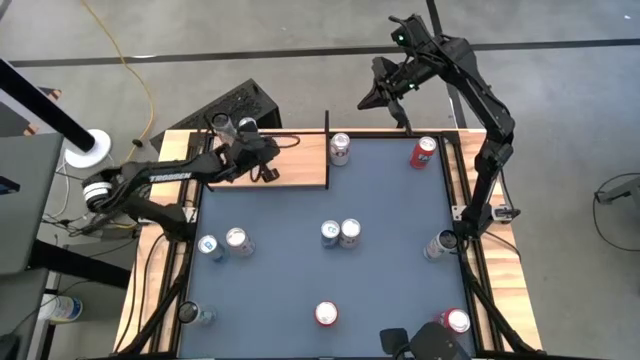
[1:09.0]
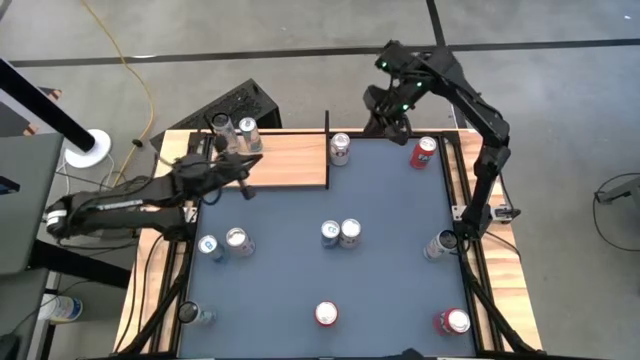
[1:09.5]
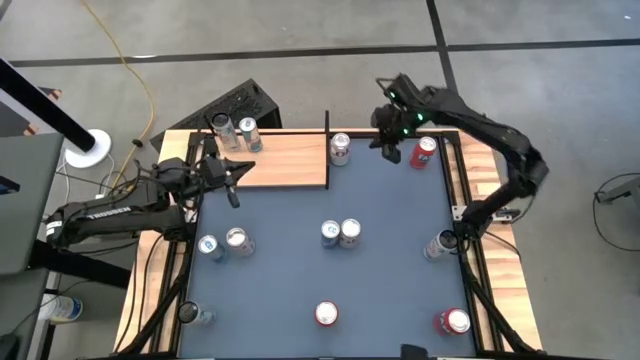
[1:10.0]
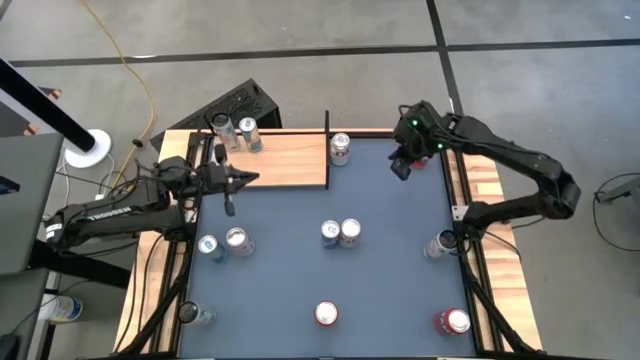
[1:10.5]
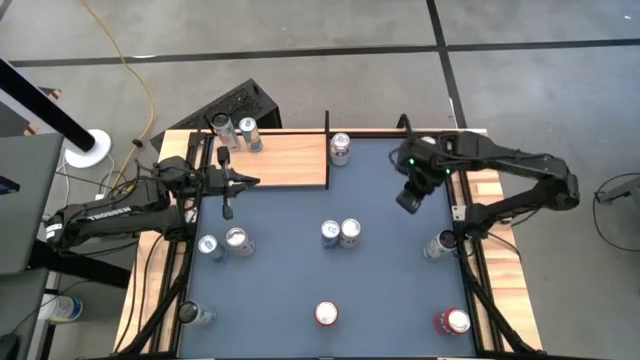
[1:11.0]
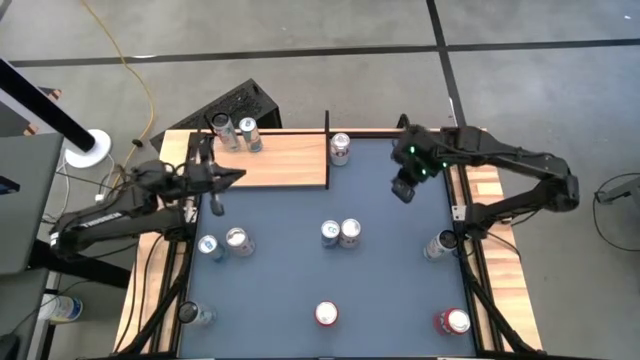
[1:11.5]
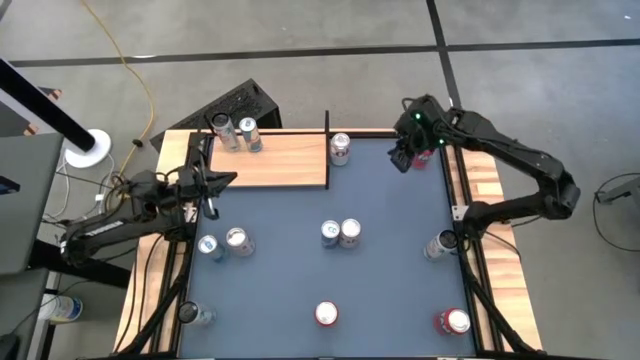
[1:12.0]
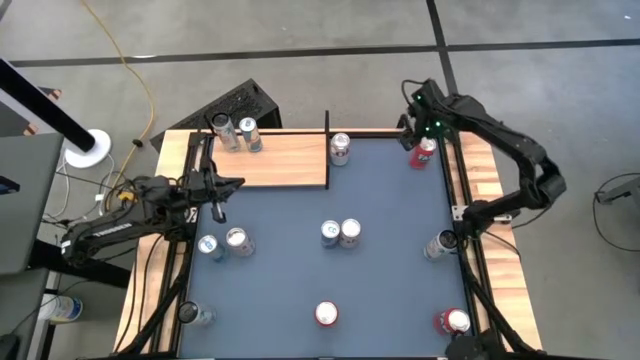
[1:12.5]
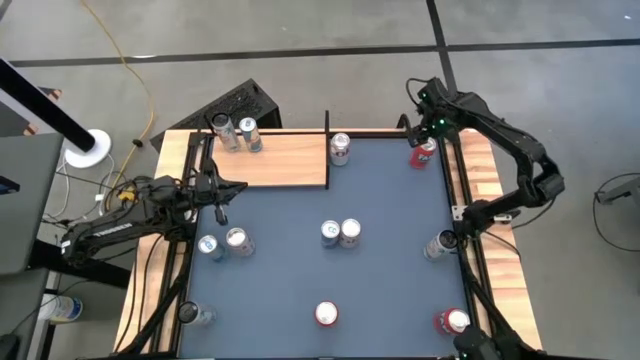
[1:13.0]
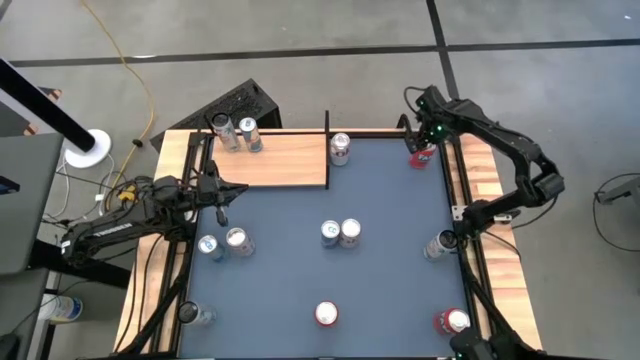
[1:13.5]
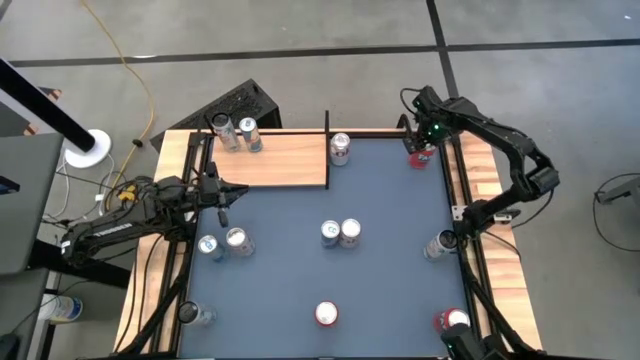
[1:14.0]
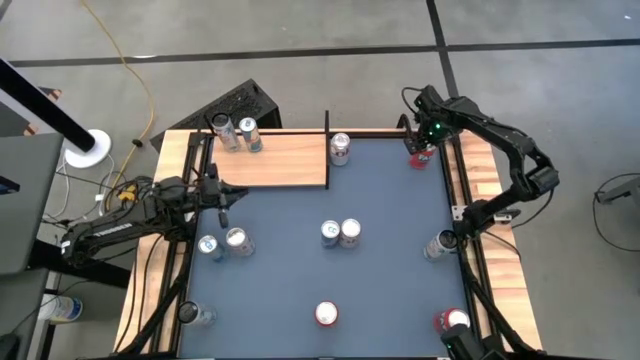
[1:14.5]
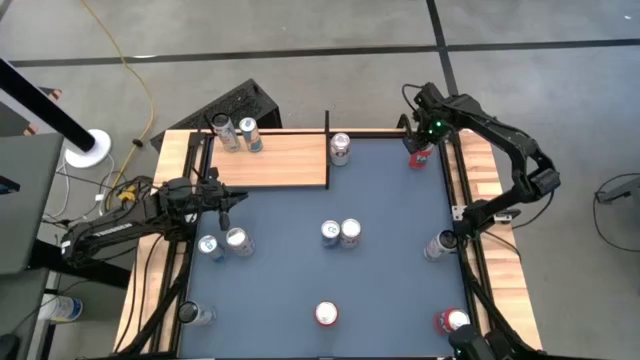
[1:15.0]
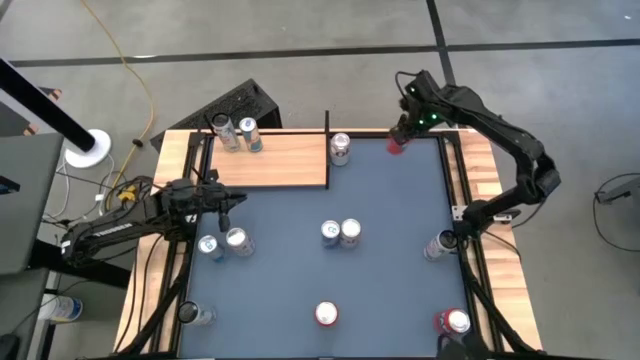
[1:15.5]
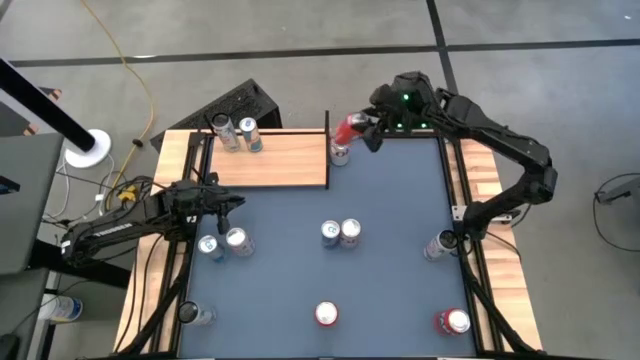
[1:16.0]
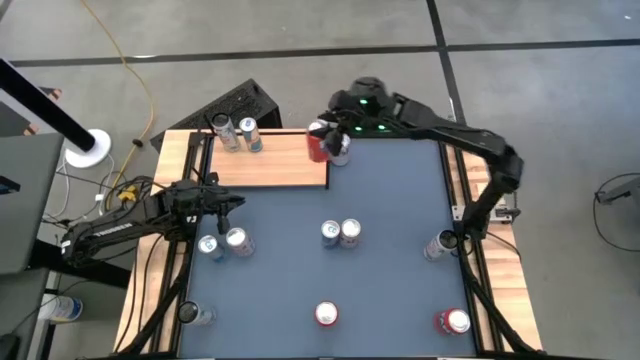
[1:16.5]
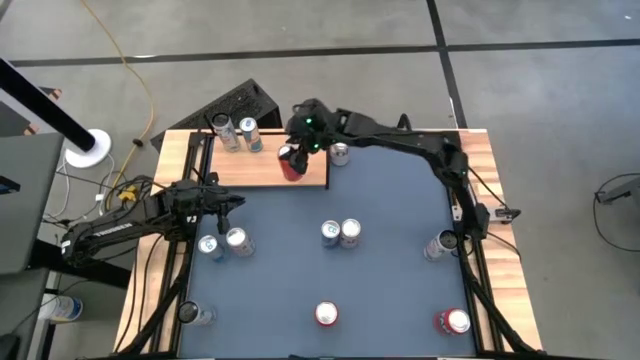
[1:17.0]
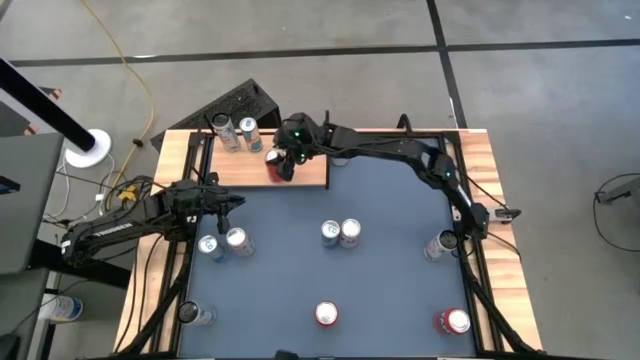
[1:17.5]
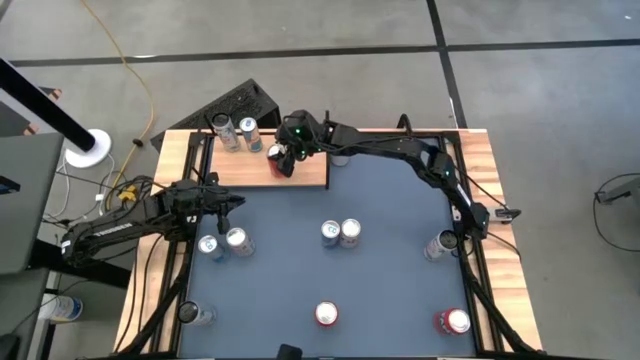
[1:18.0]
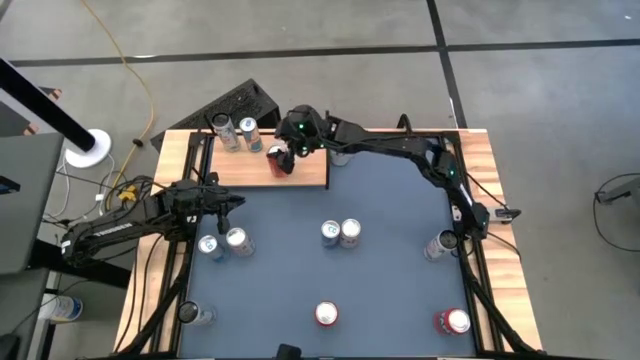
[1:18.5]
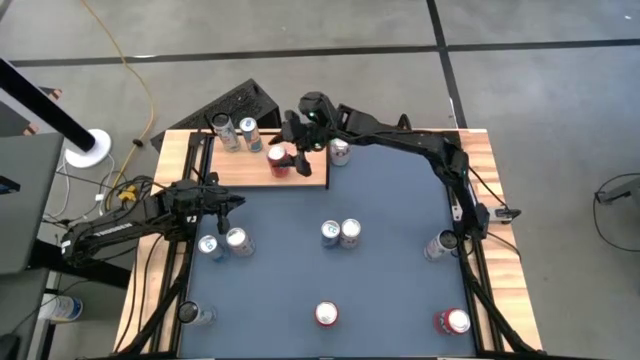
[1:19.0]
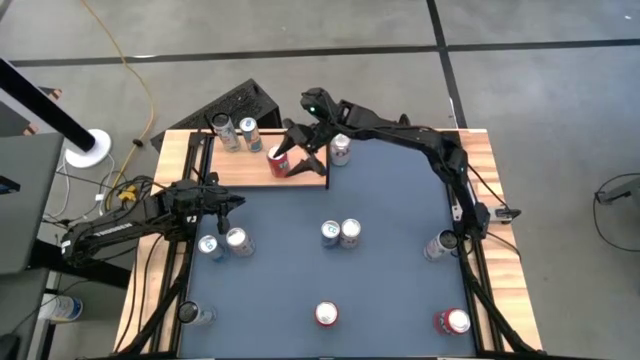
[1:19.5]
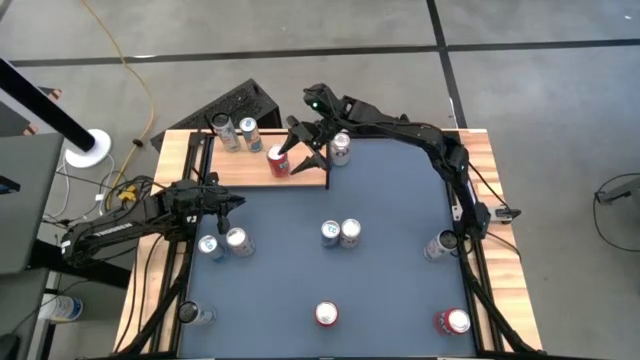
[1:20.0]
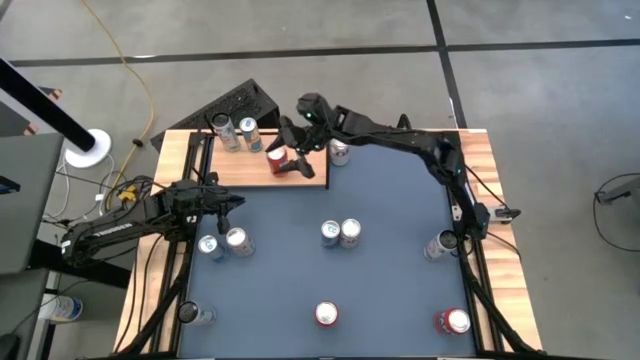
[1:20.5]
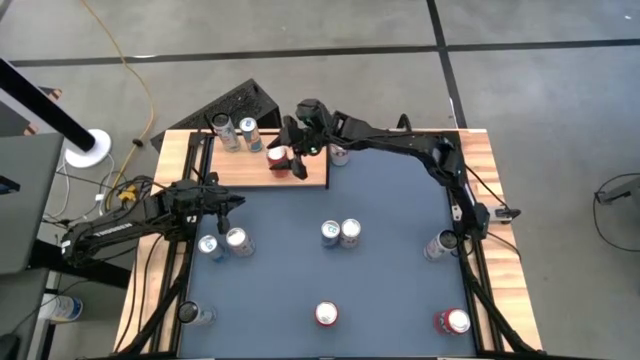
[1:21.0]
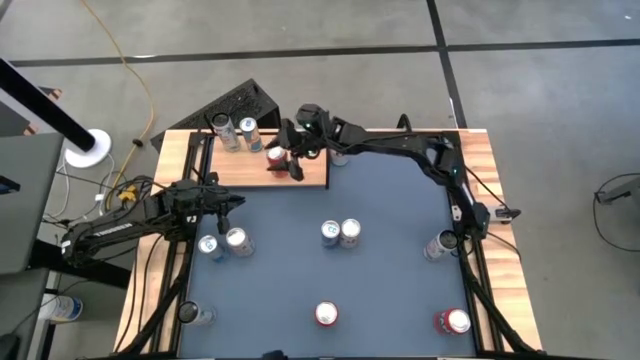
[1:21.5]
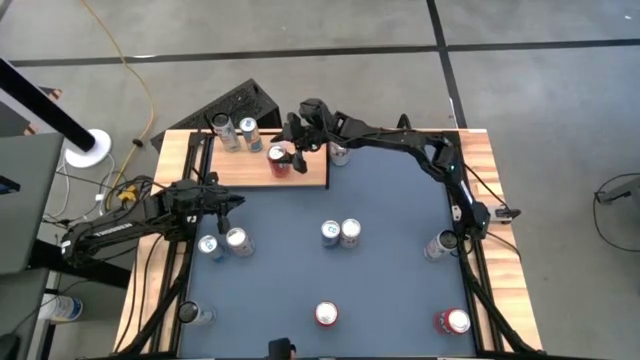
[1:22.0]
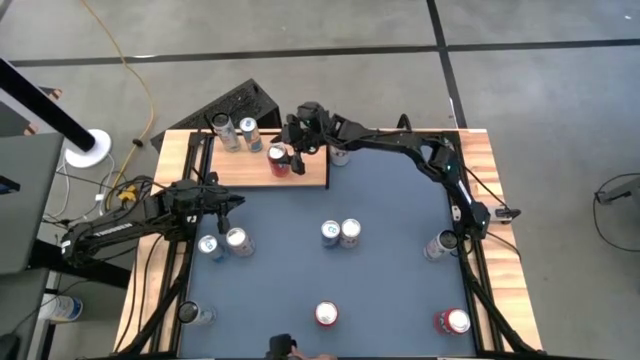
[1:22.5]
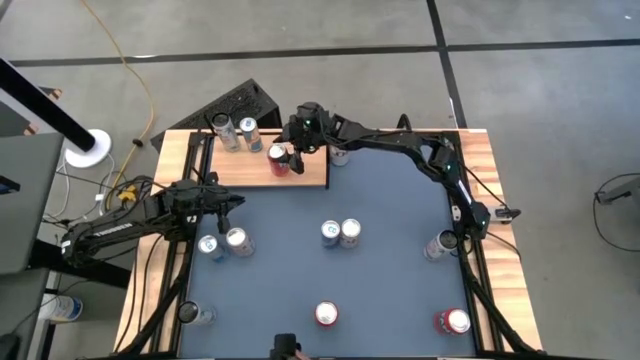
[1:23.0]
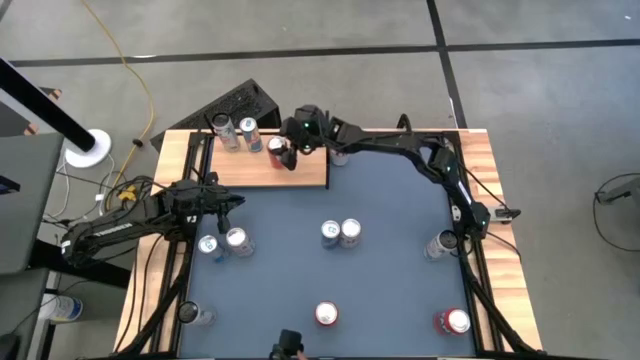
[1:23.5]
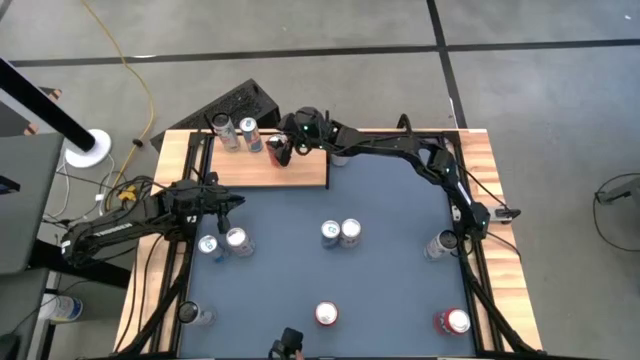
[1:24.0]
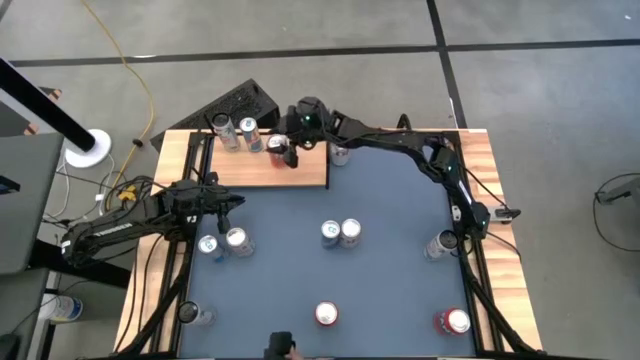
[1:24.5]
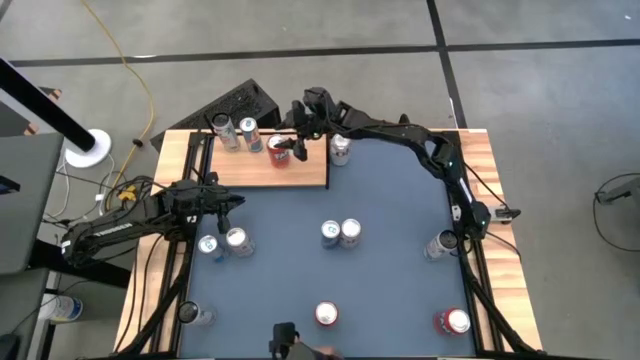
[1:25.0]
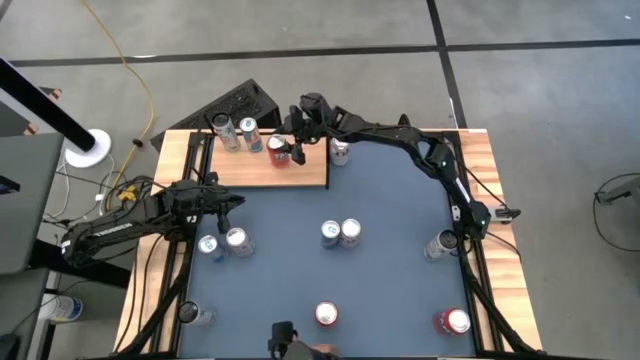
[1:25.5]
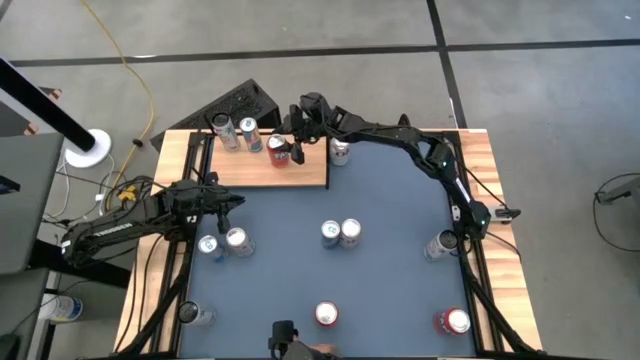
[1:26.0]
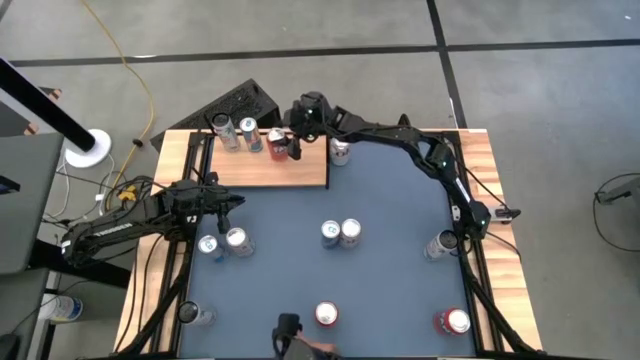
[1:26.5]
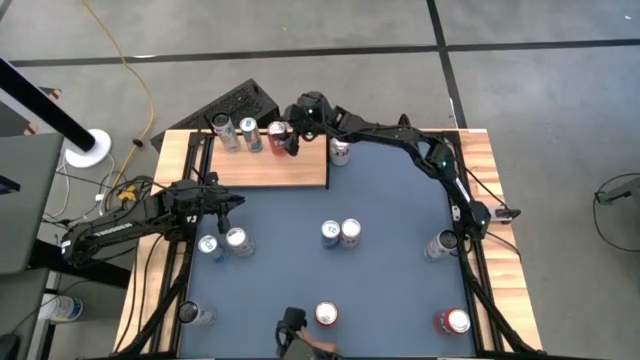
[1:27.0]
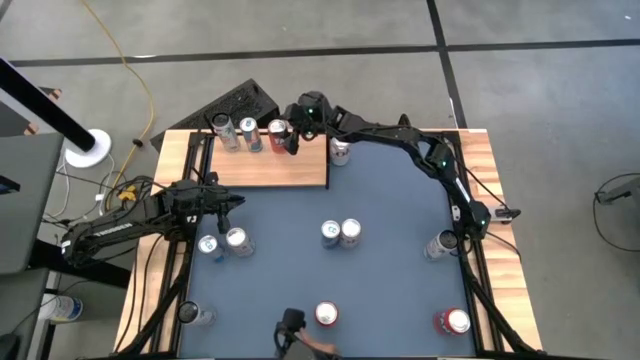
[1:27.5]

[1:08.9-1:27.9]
Task: Place canned beverage on shelf
Put the top right red soda can on the shelf

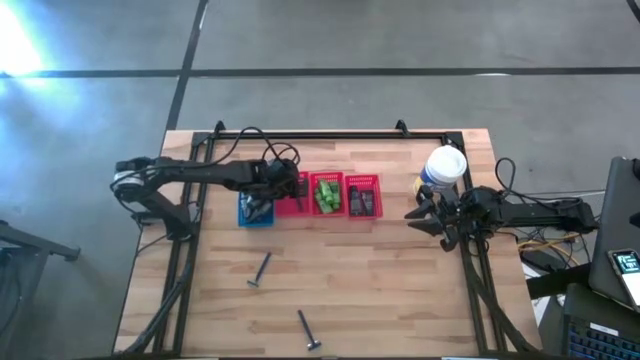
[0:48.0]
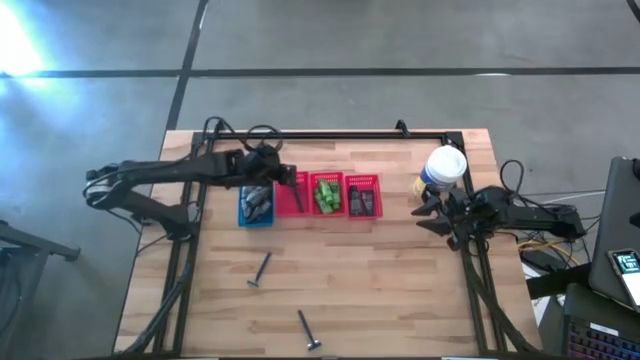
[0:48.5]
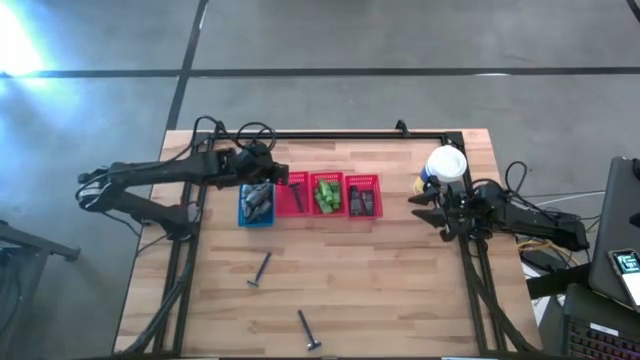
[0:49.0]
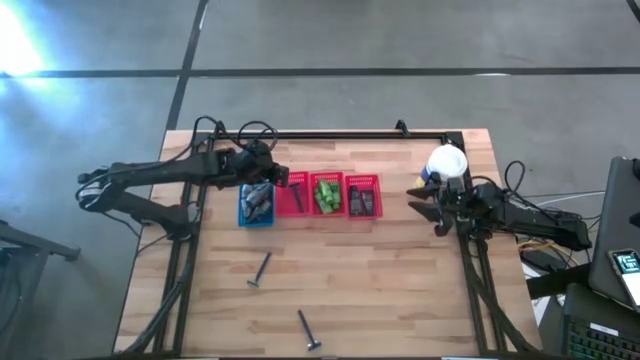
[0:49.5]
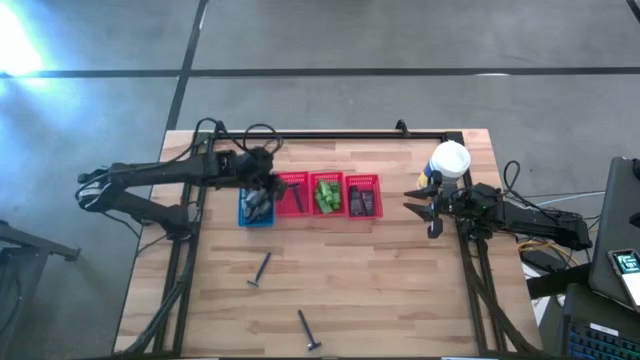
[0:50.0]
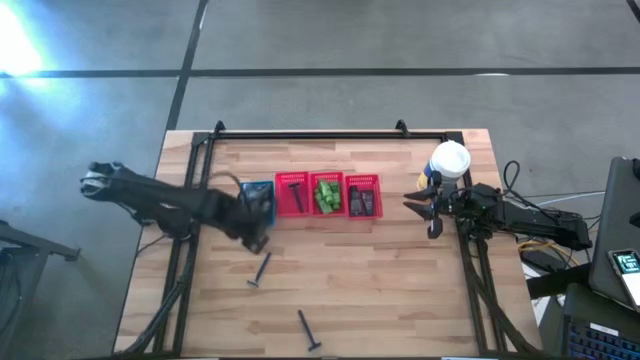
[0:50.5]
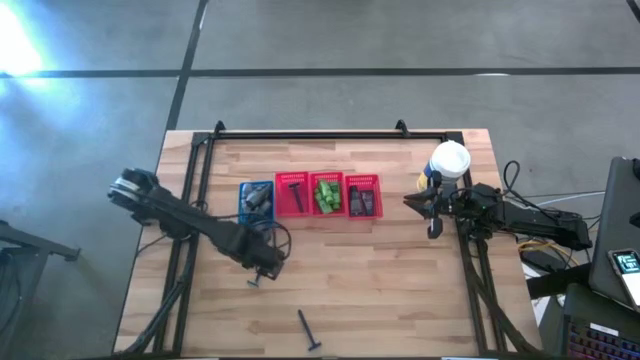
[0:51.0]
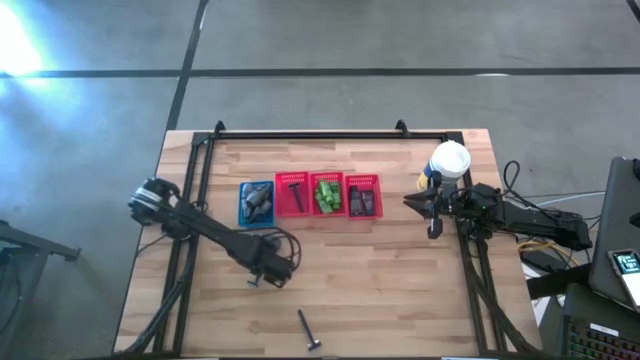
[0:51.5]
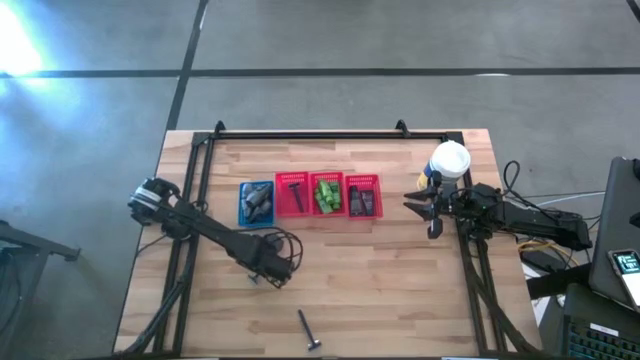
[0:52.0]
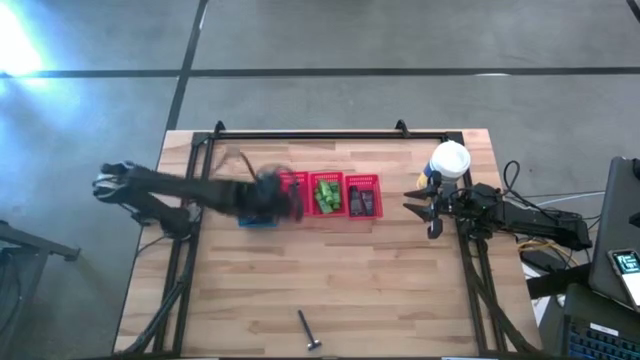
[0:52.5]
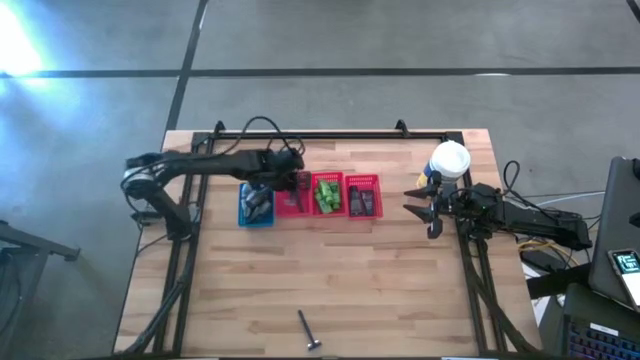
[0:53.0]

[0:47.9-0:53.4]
Task: Pick & Place Travel size toiletries
Put the blue razor into the left red bin
